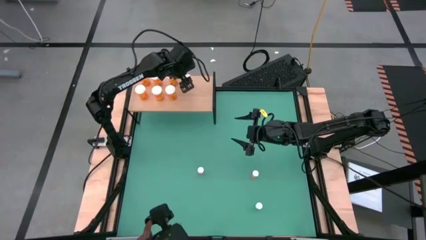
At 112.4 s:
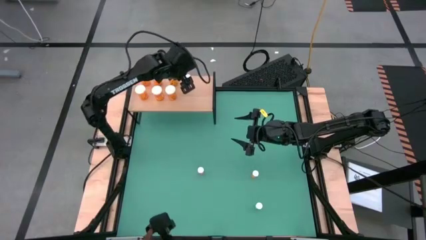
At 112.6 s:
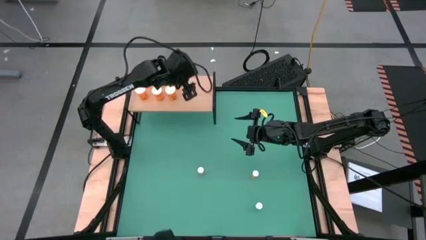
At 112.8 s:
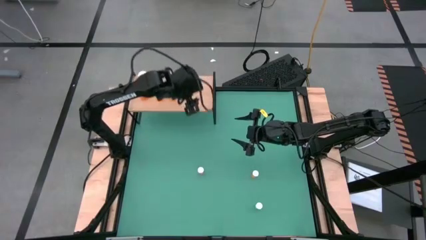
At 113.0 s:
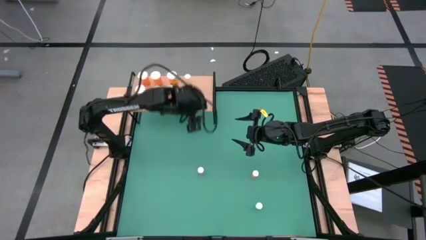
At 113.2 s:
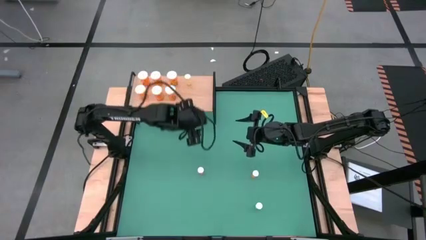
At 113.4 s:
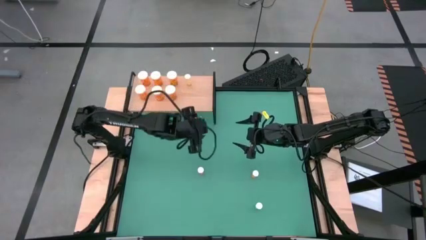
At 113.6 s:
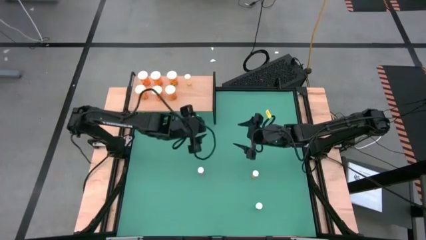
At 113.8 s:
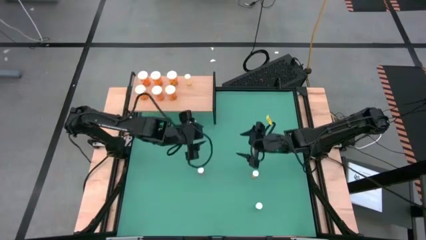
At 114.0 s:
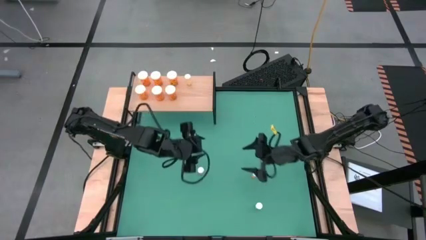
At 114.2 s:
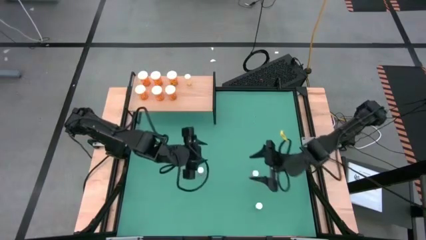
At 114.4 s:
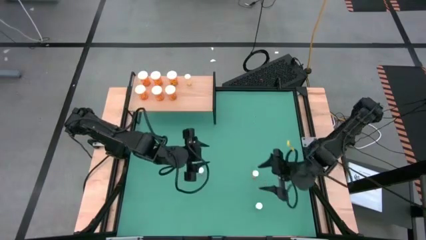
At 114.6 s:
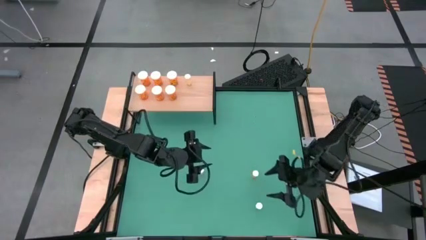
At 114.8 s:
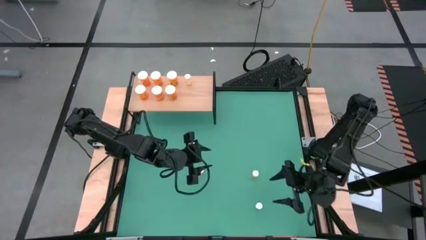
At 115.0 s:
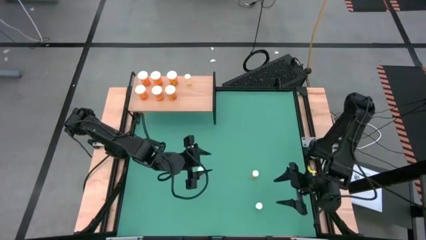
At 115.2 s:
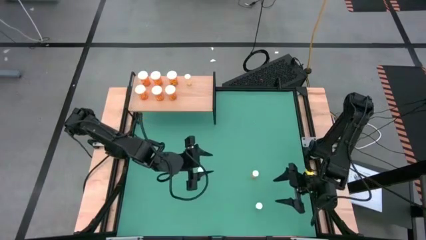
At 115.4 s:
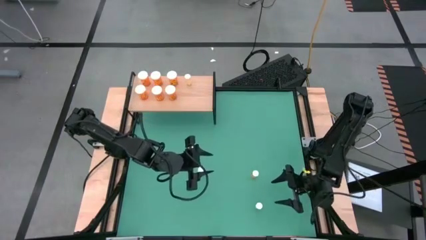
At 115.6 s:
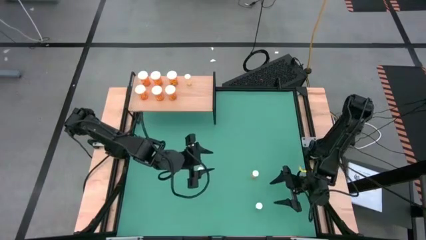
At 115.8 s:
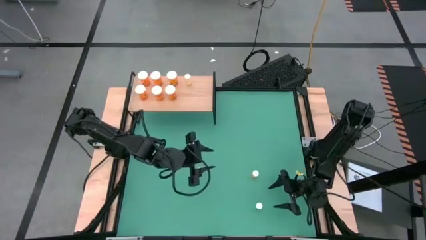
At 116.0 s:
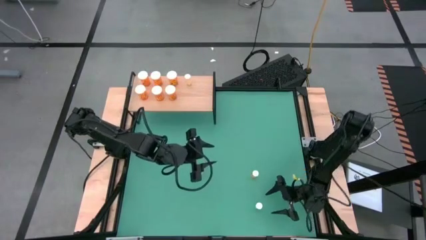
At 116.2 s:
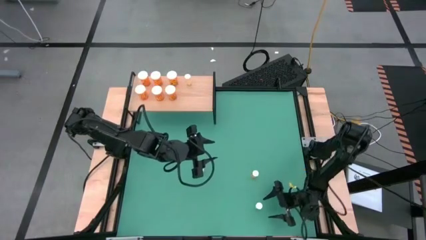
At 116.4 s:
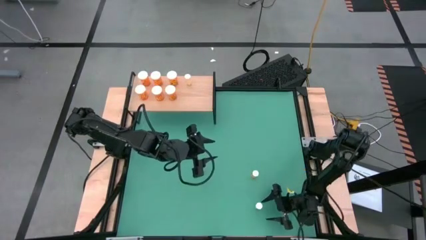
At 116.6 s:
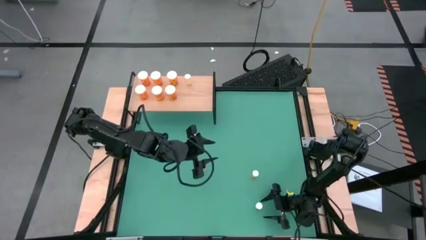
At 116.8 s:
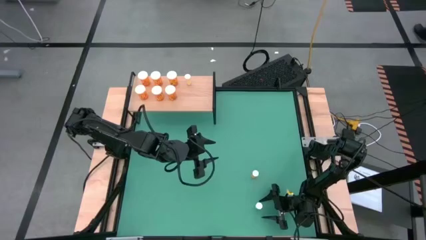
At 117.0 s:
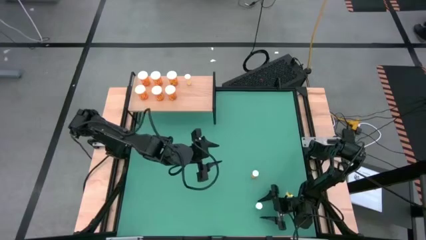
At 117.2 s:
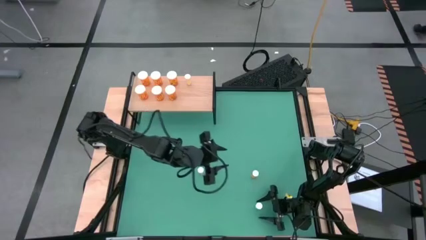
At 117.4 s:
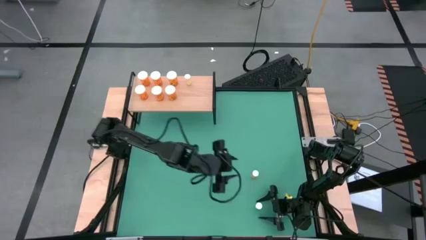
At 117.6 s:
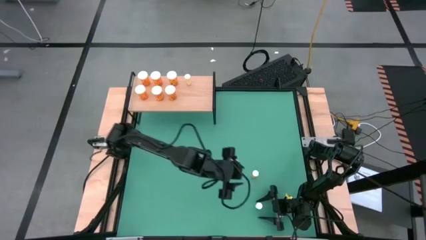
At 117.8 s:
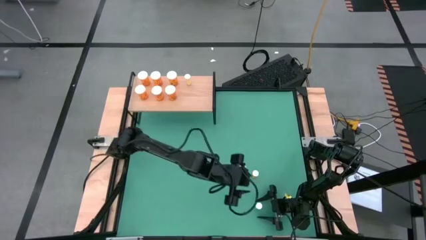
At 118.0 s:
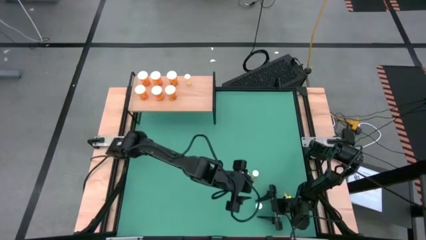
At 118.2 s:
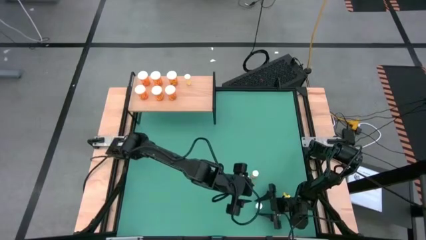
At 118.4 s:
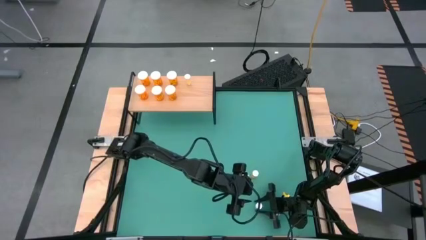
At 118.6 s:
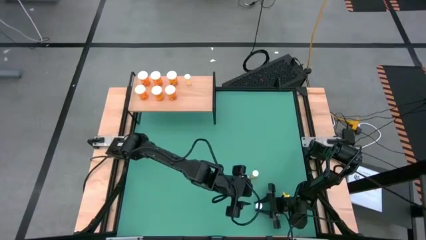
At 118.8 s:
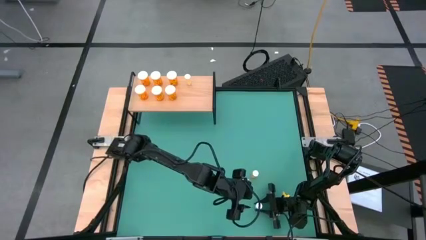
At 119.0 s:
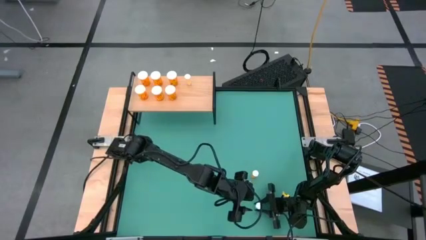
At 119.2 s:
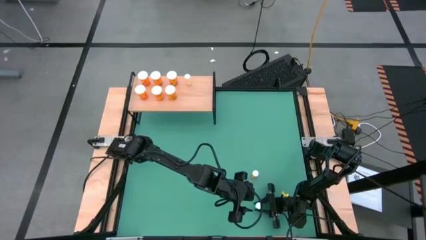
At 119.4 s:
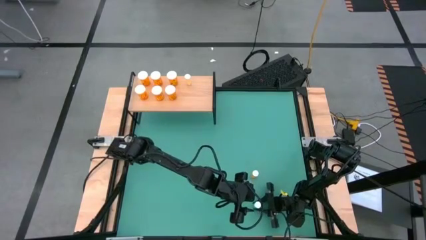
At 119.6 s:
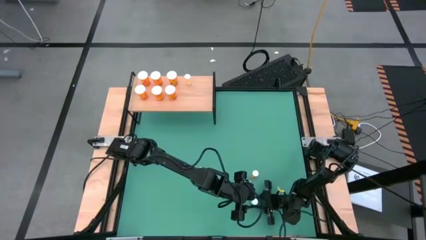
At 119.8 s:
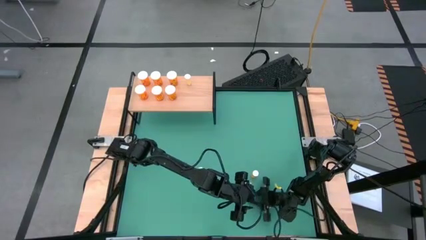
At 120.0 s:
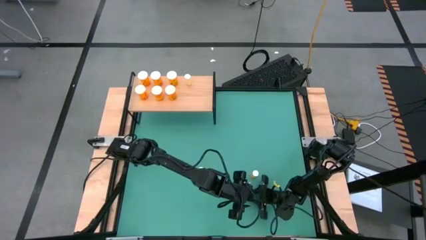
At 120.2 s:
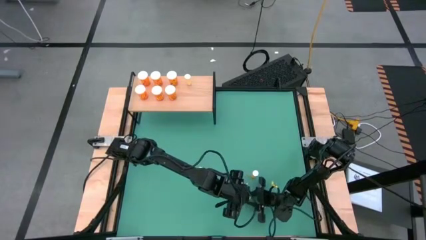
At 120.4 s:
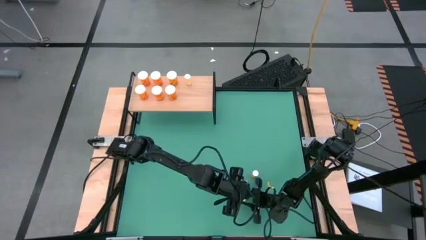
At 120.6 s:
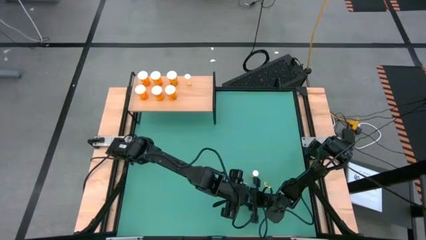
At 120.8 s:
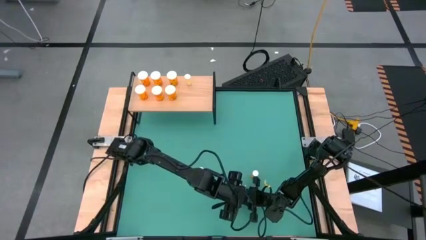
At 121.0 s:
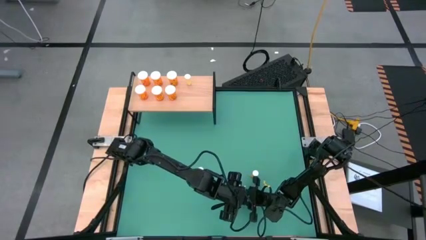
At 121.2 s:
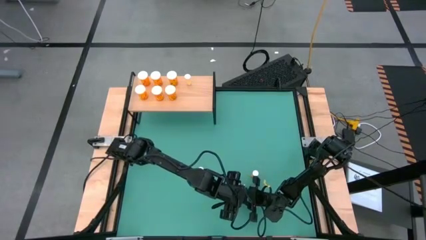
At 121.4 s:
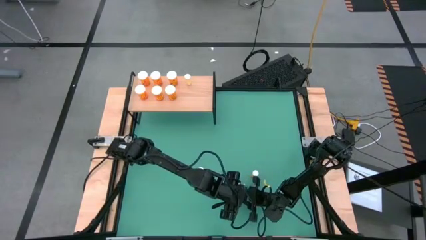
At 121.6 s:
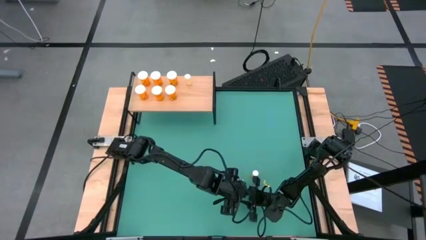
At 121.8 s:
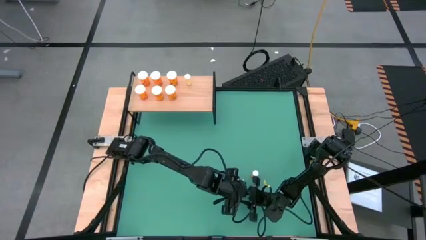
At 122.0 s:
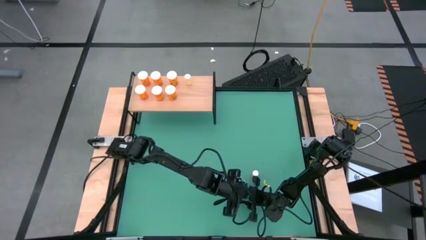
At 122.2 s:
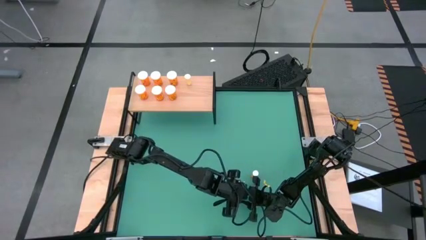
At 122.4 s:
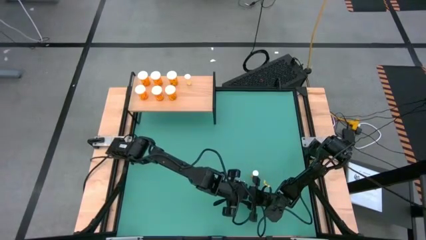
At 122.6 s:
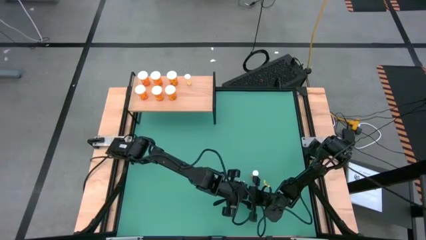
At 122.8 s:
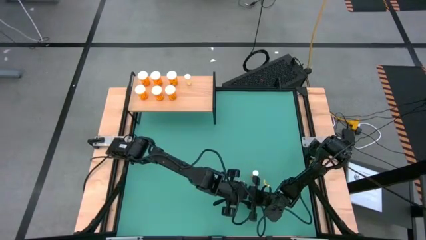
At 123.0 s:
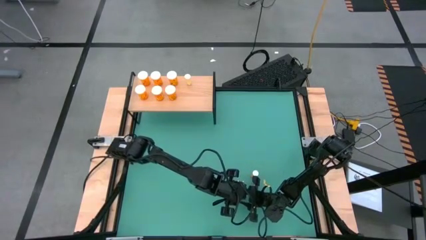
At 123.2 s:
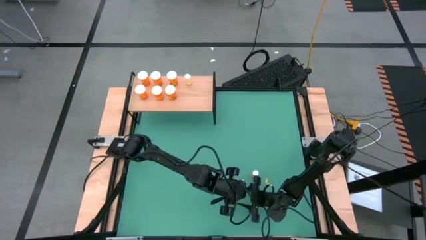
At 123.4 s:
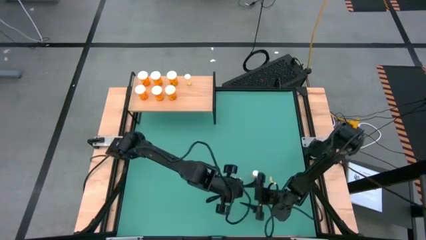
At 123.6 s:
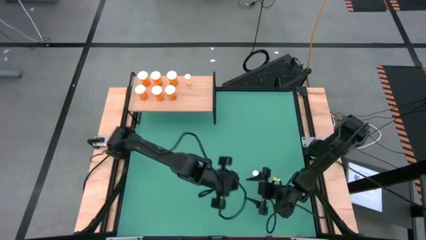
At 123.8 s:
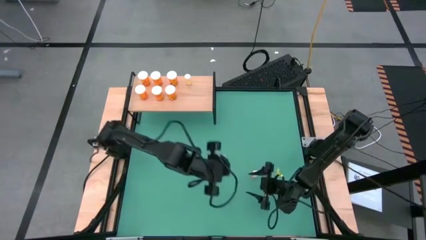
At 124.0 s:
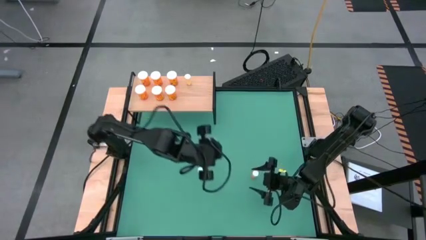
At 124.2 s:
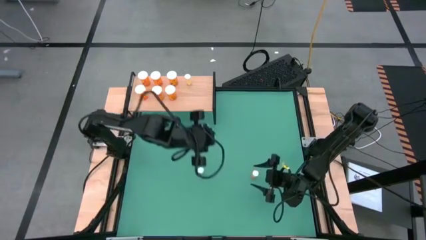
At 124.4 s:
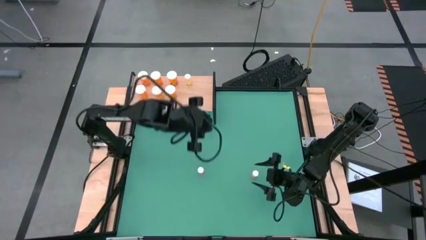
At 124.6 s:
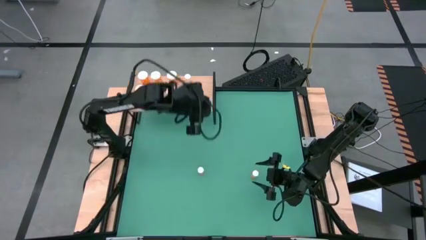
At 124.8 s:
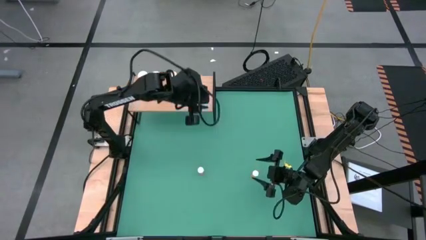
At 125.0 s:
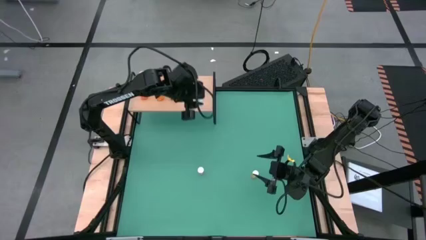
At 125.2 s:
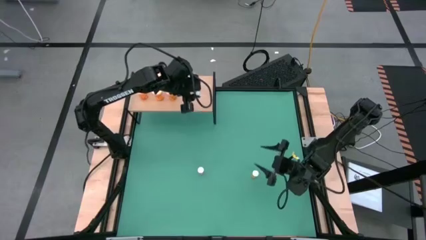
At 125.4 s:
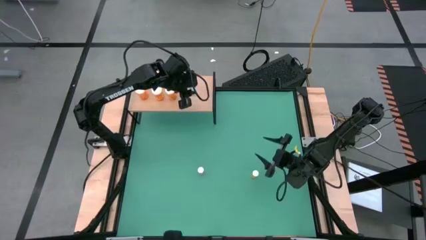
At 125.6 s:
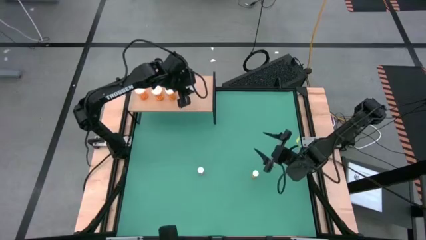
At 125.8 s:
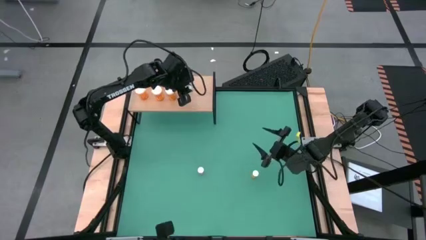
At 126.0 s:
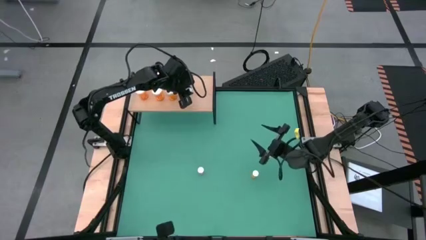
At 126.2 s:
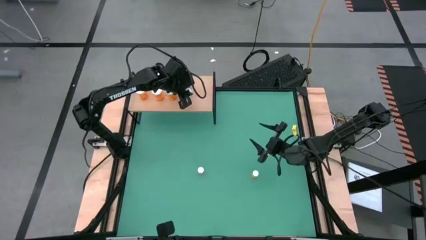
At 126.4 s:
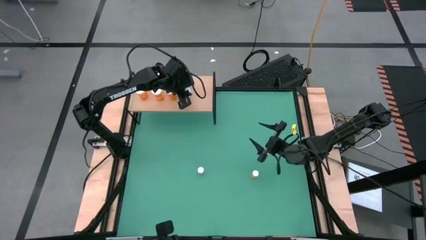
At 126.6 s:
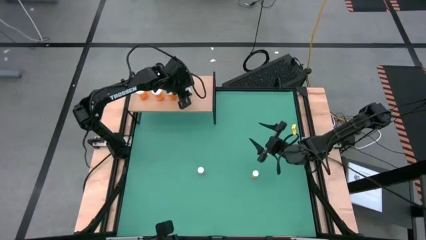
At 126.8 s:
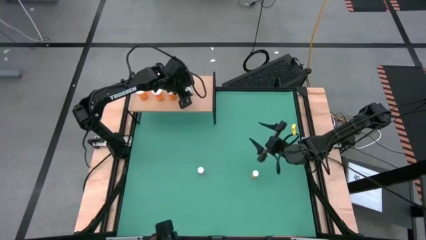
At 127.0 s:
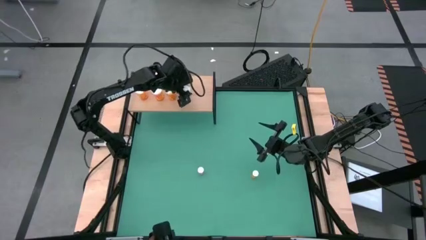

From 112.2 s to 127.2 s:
Task: Pick and place medicine bottles onto shelf by color
Put the small blue pill bottle on the shelf aligned with the other small yellow pill bottle
